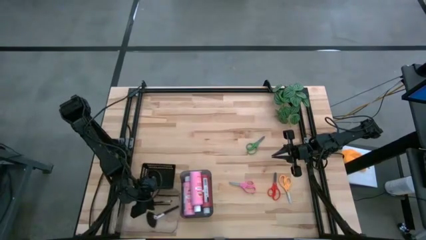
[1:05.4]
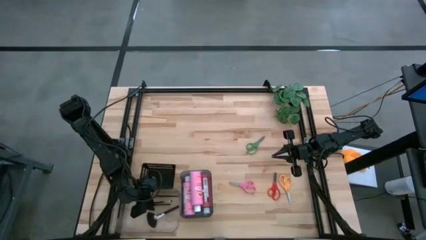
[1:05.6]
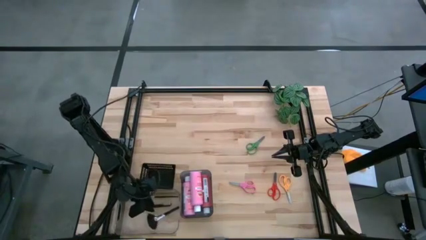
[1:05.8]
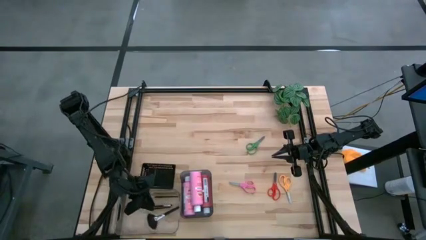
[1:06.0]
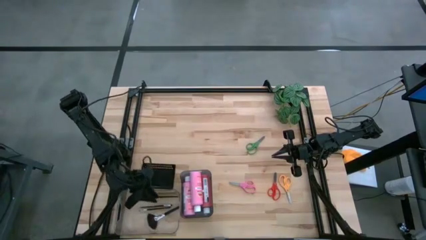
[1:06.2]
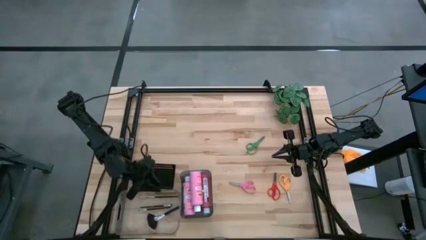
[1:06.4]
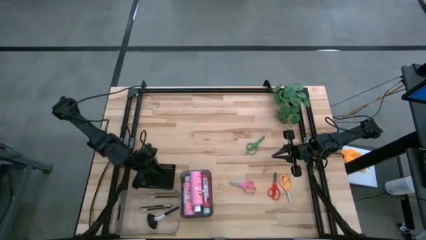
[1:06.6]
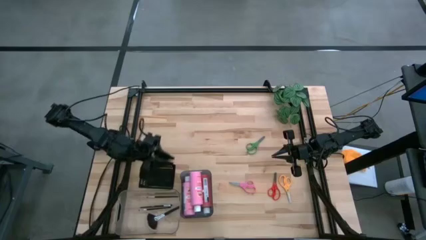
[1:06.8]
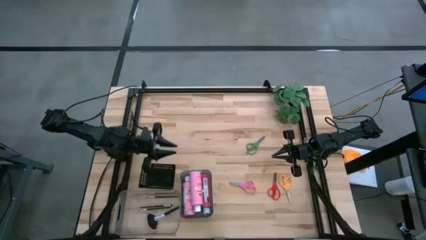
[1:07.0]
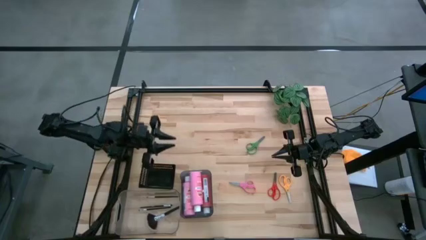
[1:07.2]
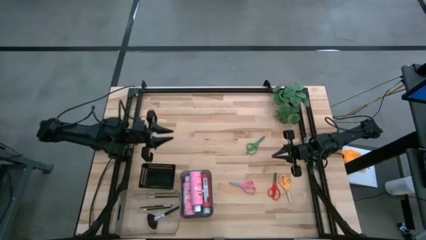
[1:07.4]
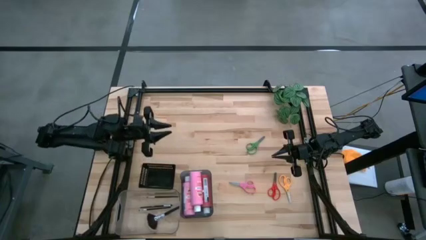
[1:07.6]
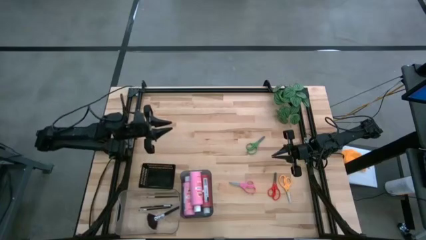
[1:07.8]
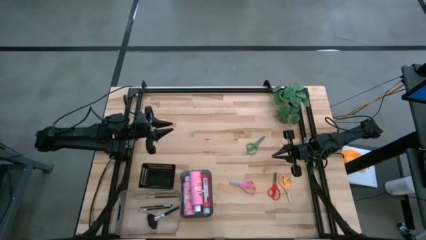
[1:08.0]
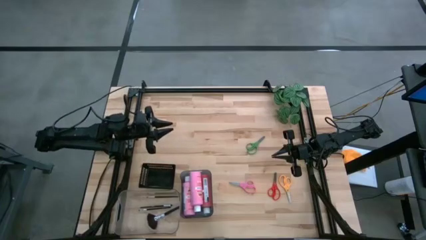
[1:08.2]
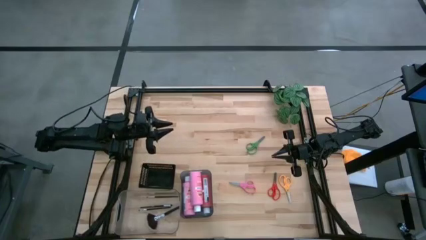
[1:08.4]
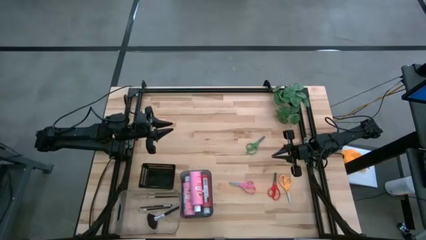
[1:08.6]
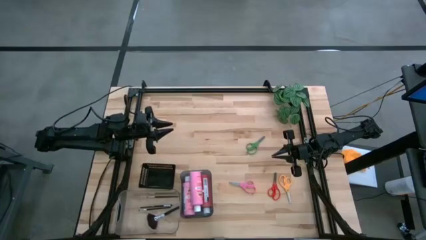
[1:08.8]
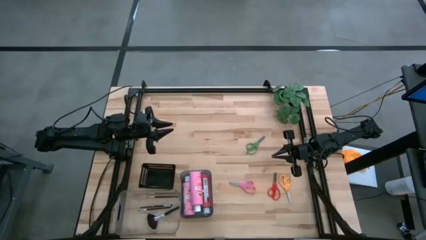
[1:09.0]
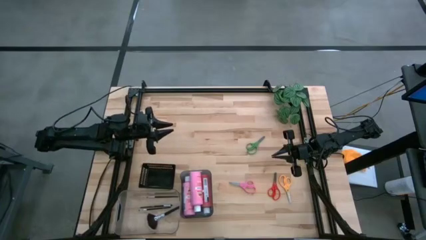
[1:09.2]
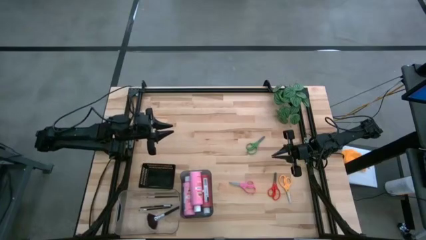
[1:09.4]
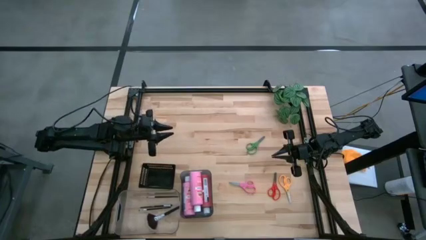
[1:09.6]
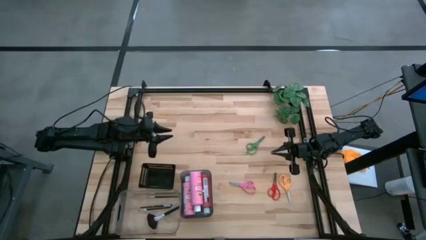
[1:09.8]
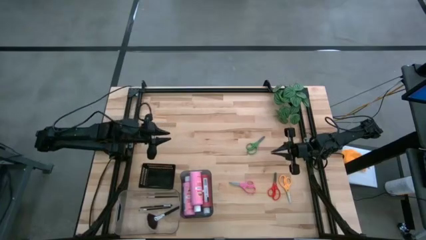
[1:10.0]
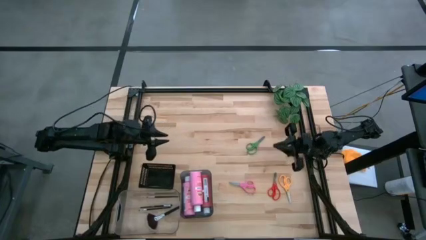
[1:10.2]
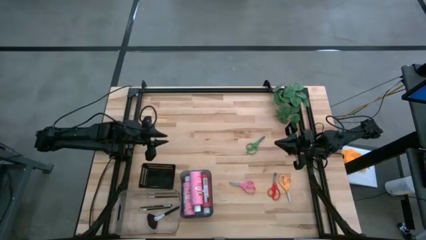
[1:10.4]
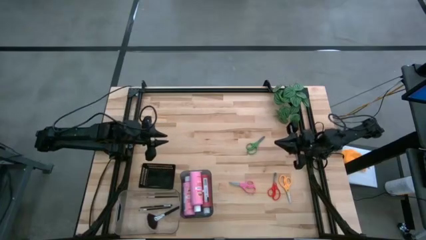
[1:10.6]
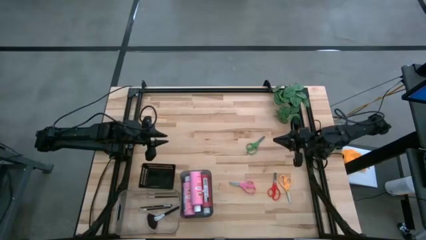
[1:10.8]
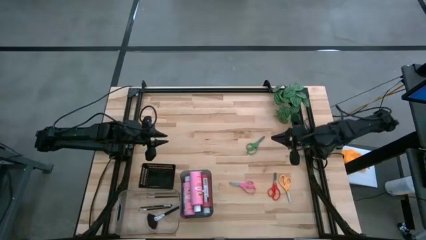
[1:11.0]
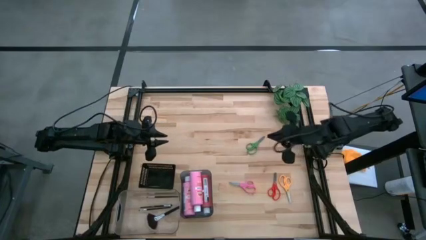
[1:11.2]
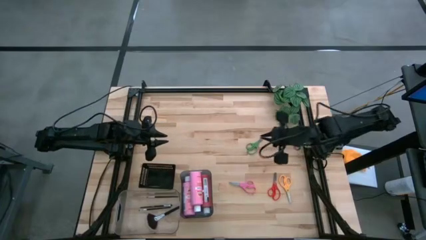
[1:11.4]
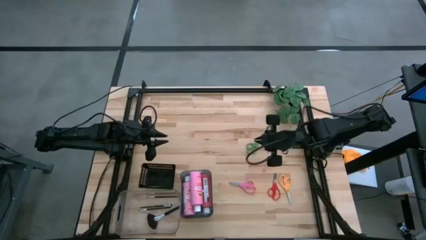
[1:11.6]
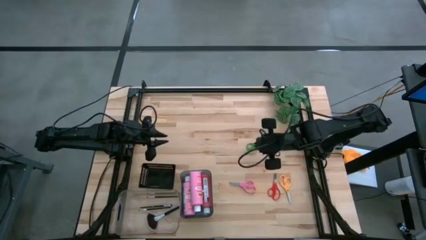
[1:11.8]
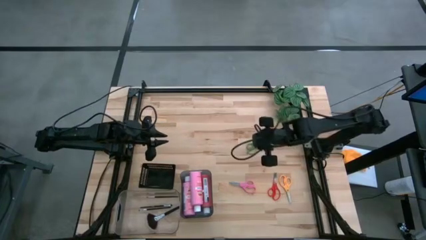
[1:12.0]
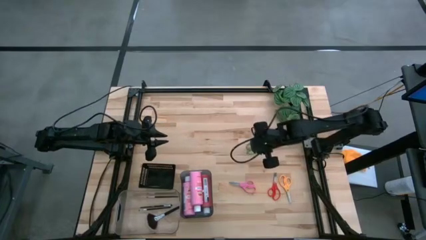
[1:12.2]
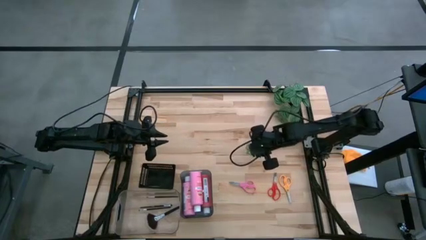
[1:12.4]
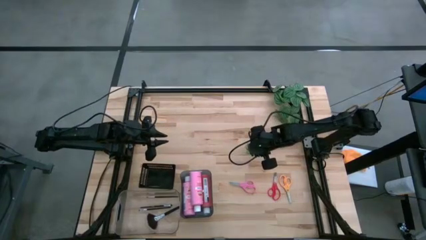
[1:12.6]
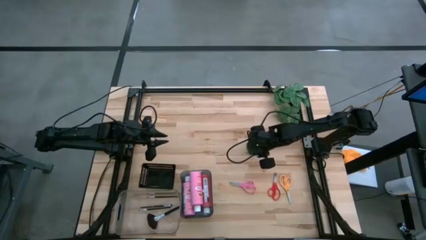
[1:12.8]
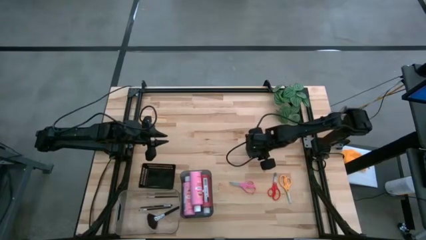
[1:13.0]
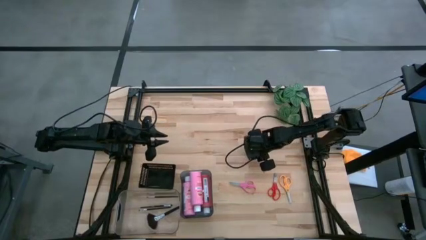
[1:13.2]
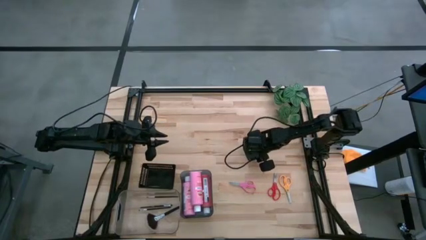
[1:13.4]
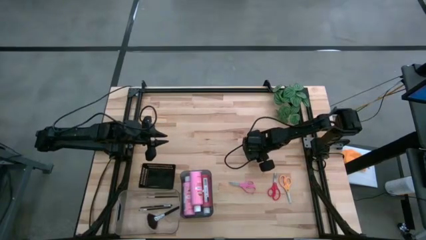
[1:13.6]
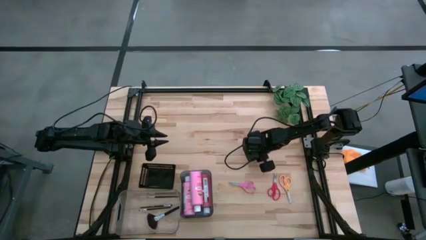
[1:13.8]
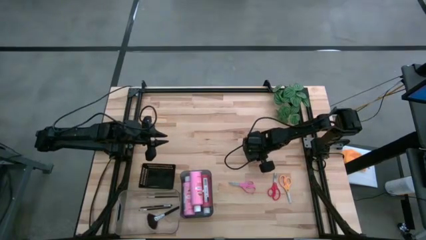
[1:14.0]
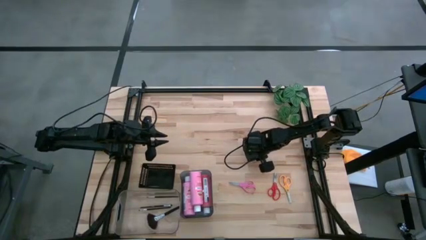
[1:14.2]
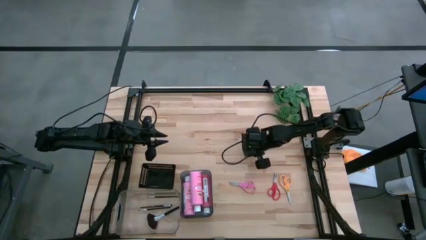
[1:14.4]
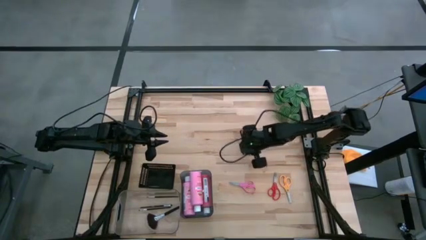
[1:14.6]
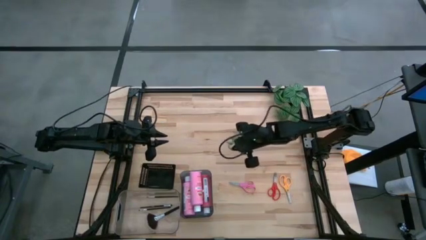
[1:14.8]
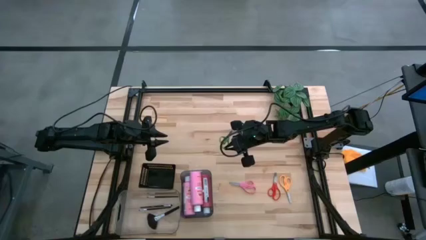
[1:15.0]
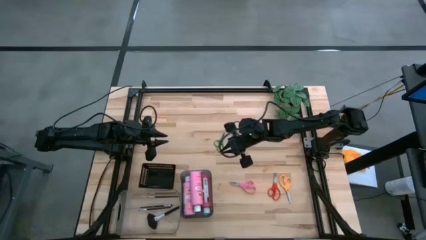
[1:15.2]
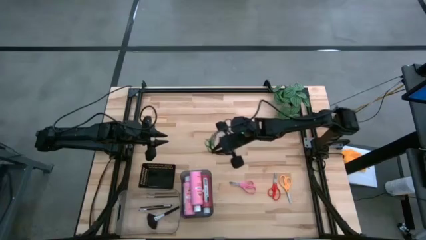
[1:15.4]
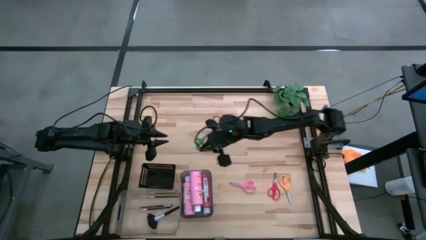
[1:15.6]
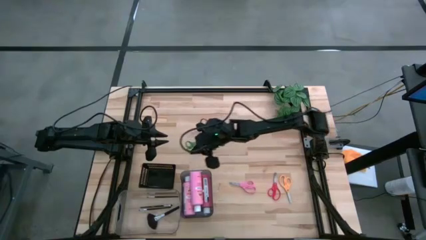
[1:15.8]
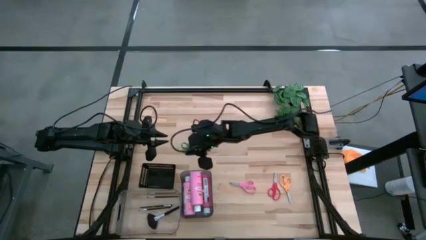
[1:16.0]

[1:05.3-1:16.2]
Task: Pick & Place Paint Supplies
Put the green scissors into the black bin

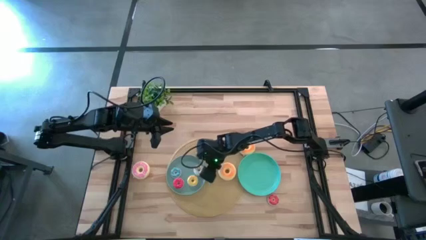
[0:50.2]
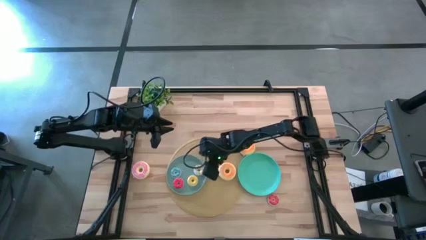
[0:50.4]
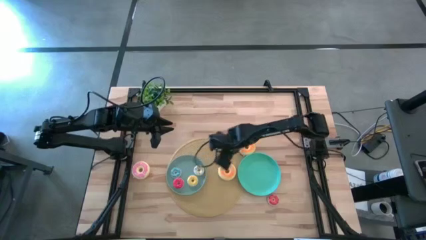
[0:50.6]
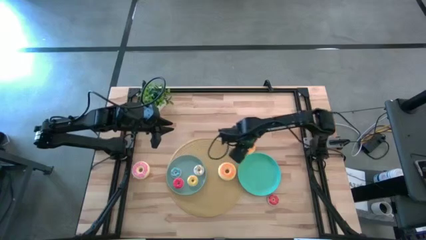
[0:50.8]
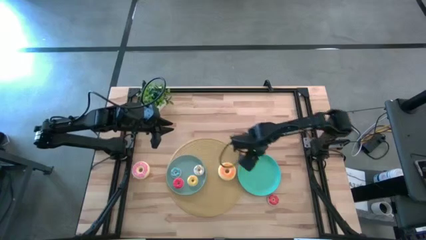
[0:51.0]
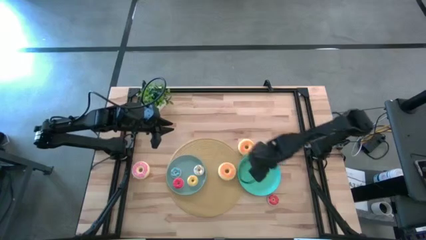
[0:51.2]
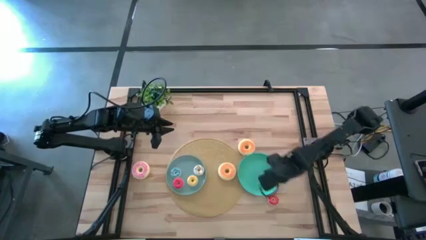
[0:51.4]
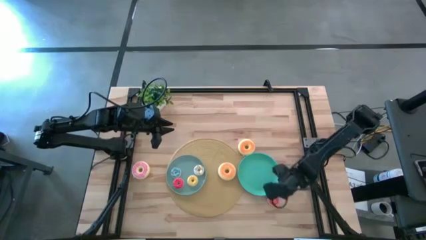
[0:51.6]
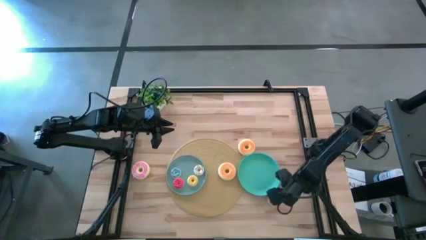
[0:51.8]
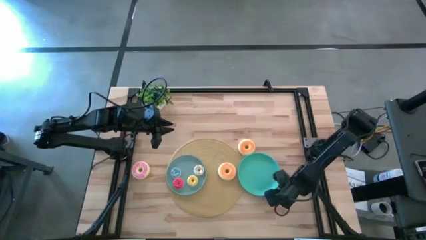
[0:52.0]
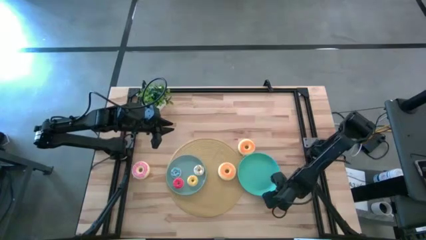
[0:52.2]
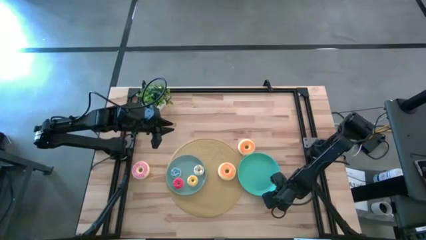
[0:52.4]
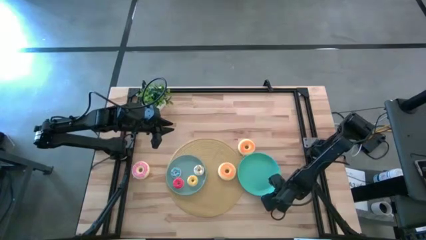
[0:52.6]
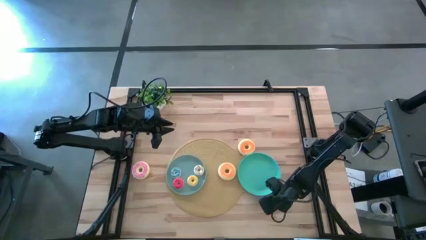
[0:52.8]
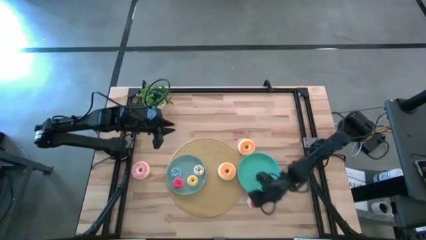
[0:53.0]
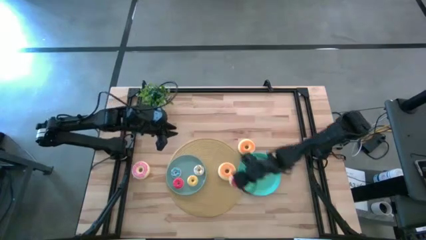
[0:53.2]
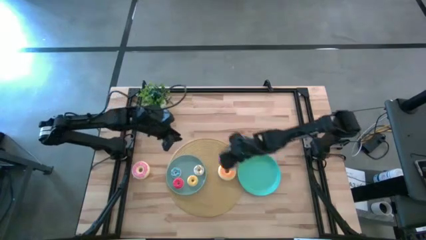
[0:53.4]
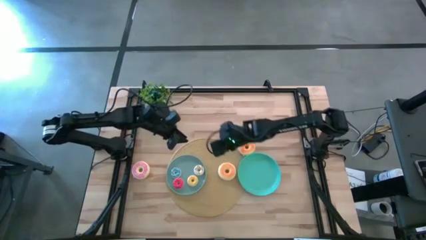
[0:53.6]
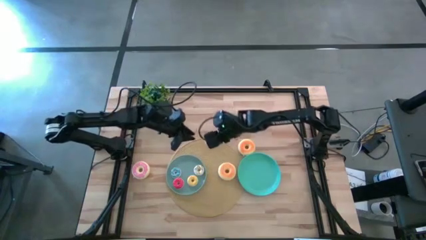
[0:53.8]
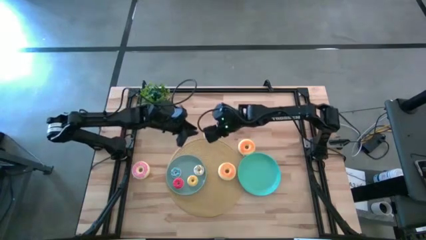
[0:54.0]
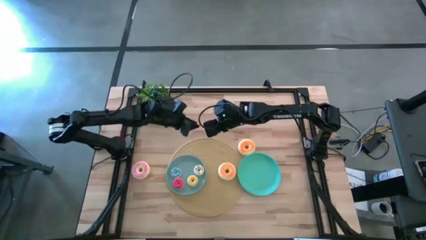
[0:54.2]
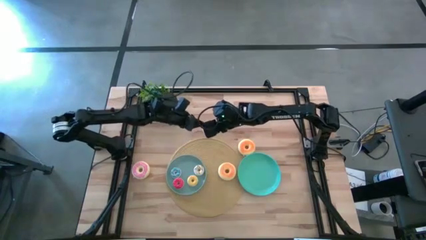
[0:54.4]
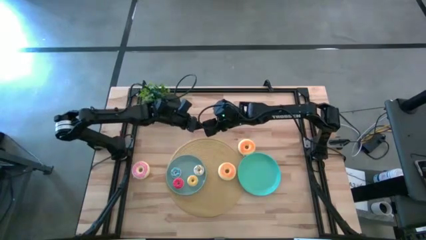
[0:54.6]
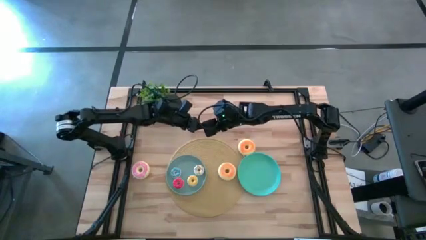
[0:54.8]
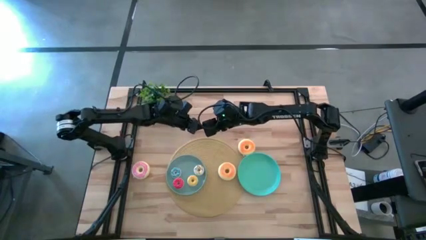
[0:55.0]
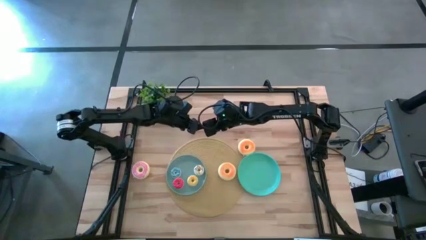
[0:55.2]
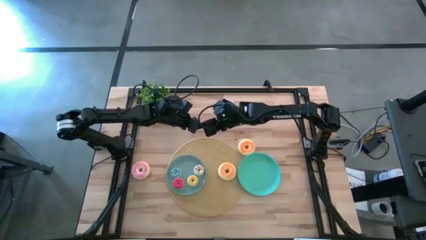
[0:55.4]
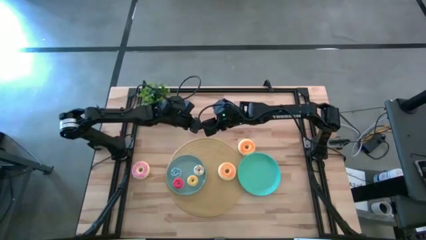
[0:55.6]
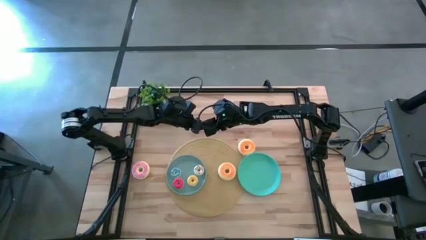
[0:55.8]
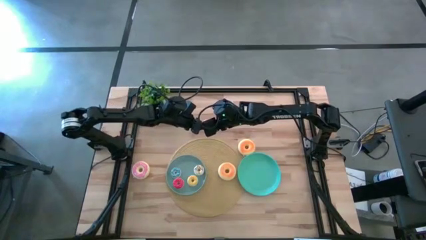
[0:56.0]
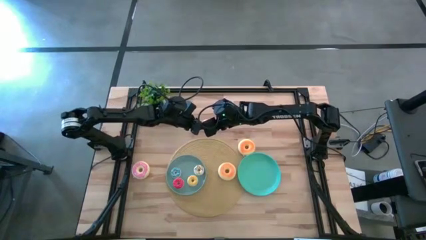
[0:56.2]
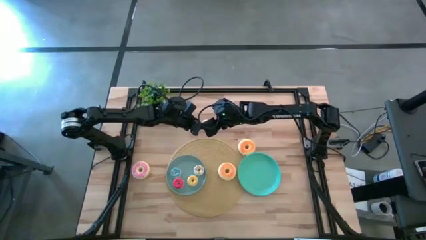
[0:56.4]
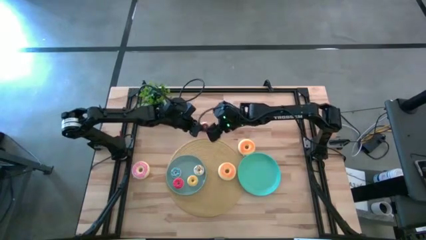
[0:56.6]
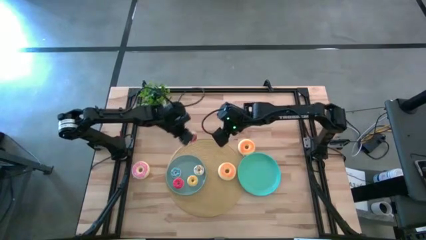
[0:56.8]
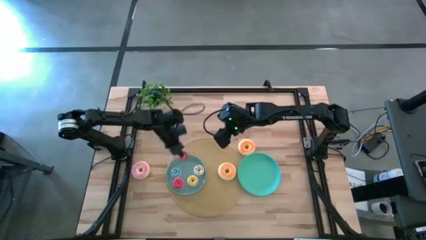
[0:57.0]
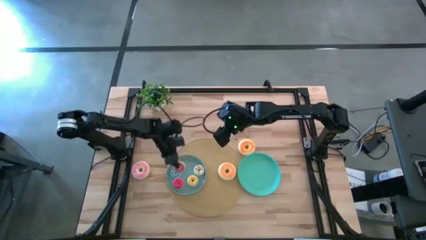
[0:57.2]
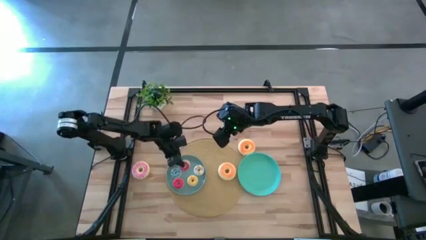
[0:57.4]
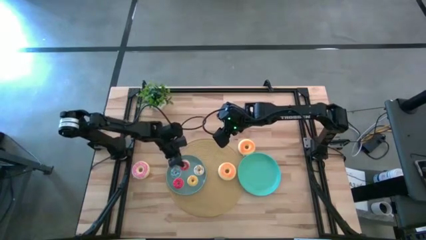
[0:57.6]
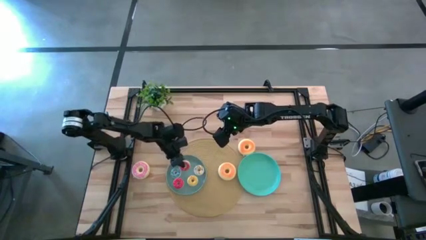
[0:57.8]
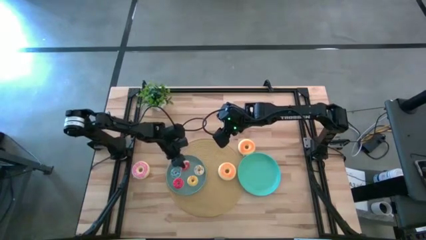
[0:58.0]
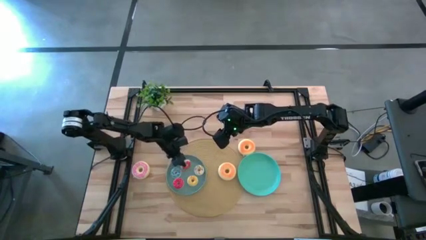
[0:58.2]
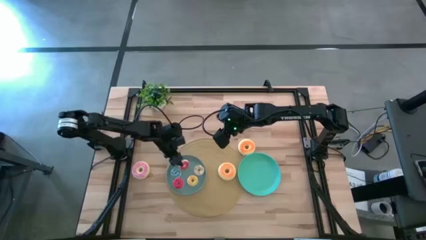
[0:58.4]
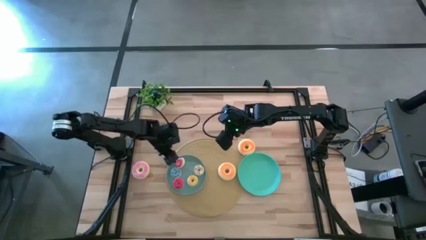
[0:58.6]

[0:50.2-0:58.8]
Task: Pick & Place donuts
Put the small orange donut on the blue plate
